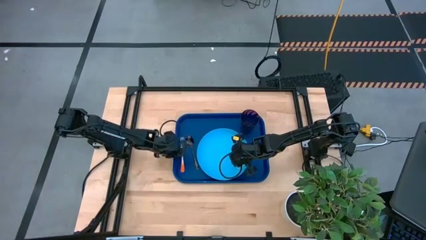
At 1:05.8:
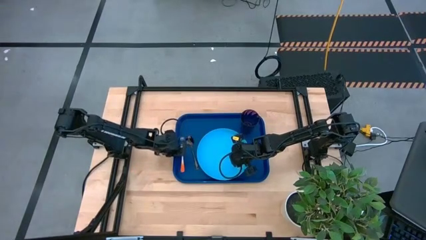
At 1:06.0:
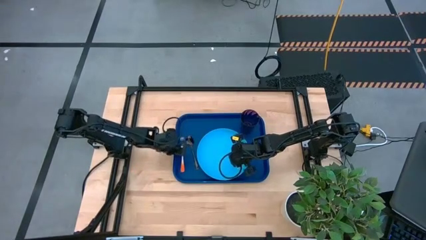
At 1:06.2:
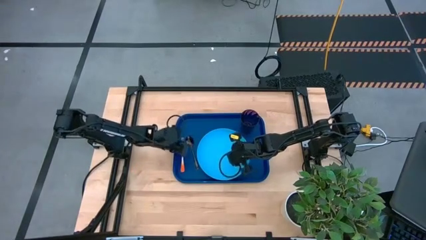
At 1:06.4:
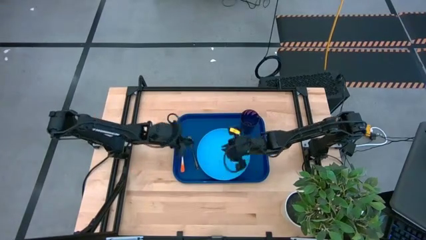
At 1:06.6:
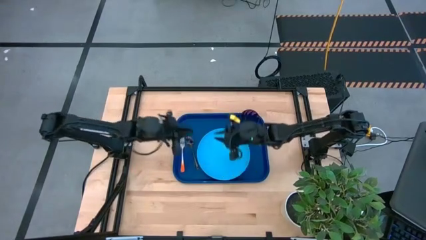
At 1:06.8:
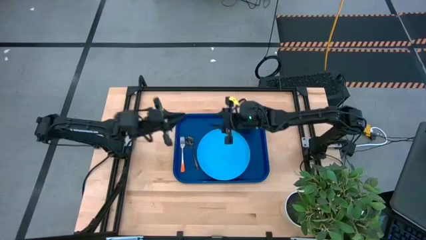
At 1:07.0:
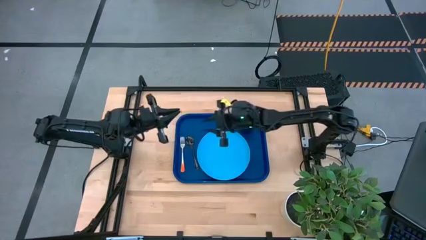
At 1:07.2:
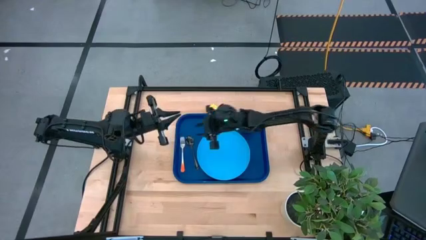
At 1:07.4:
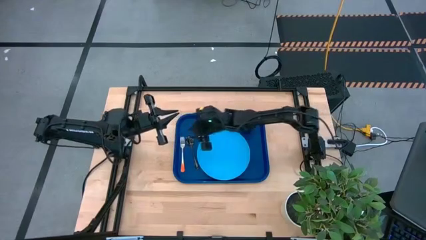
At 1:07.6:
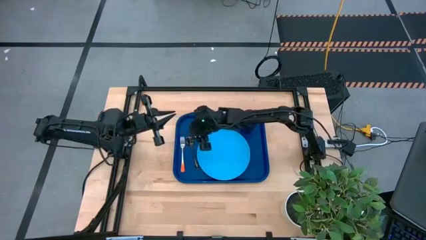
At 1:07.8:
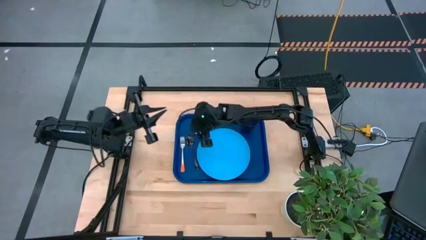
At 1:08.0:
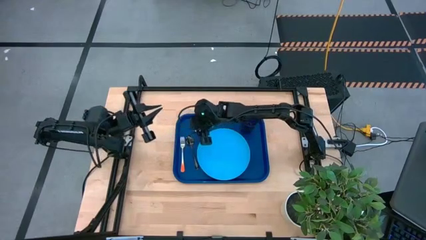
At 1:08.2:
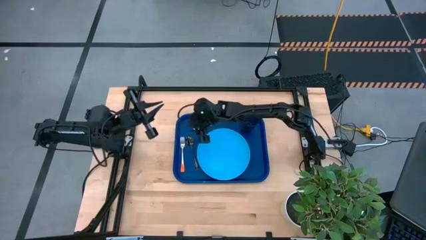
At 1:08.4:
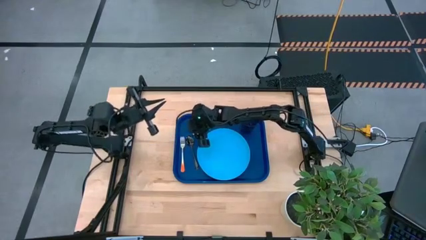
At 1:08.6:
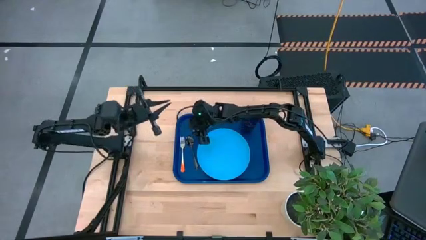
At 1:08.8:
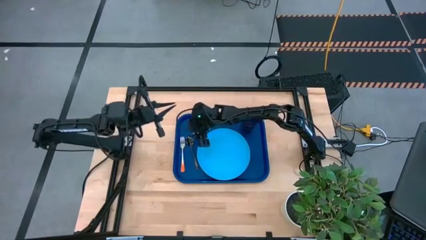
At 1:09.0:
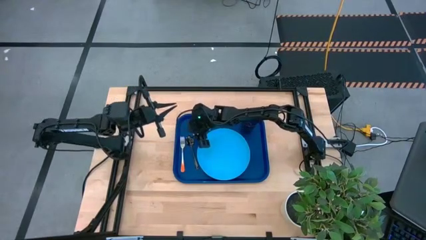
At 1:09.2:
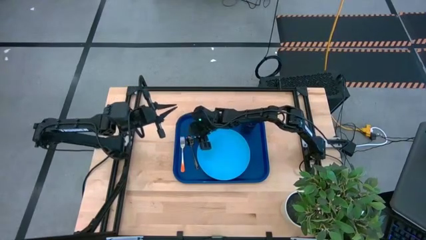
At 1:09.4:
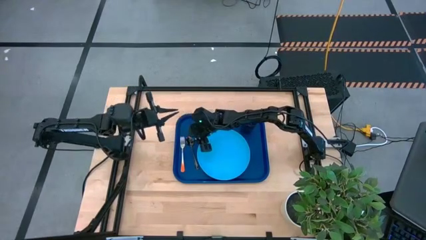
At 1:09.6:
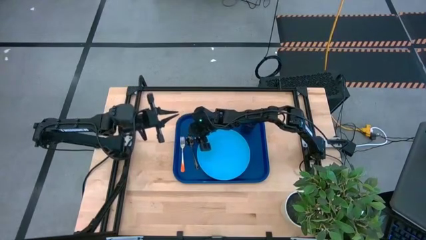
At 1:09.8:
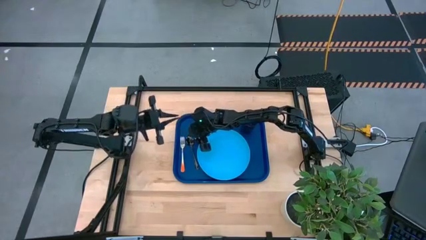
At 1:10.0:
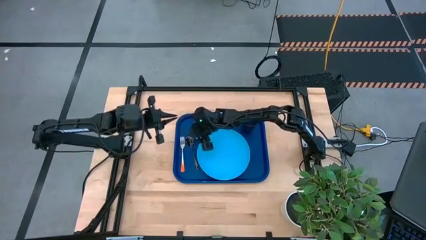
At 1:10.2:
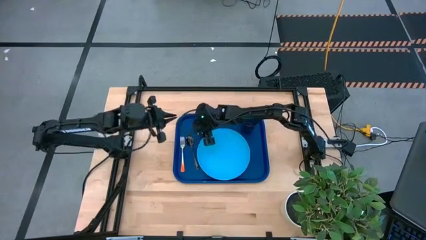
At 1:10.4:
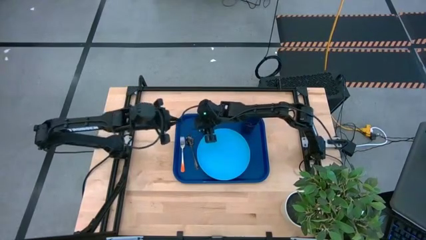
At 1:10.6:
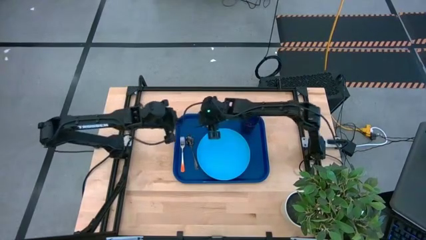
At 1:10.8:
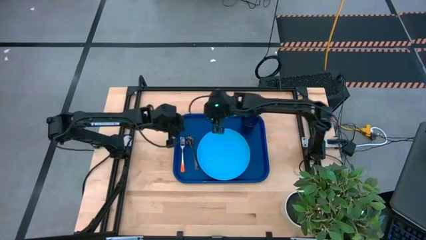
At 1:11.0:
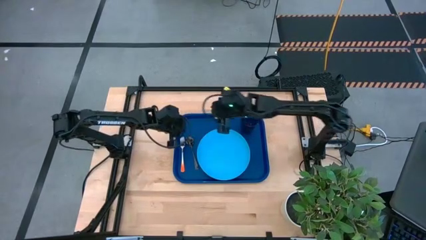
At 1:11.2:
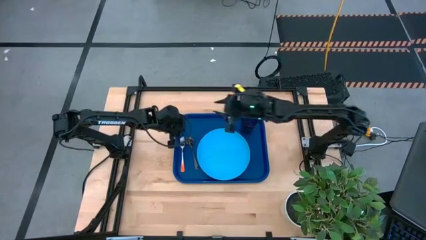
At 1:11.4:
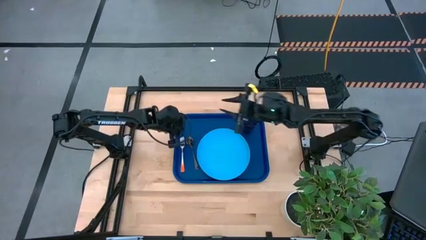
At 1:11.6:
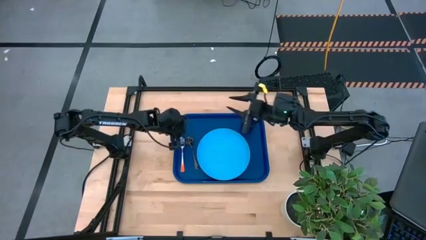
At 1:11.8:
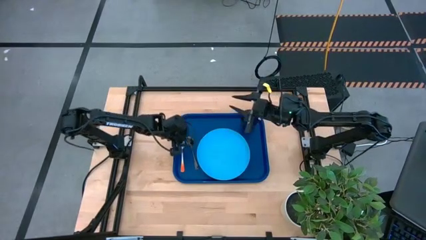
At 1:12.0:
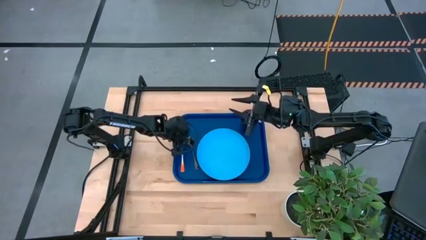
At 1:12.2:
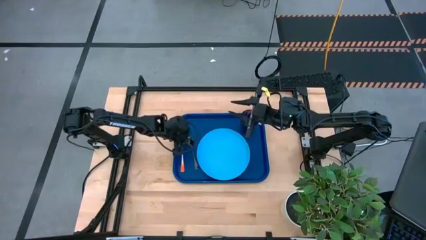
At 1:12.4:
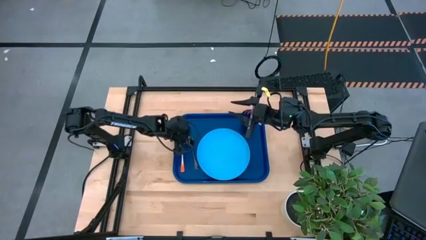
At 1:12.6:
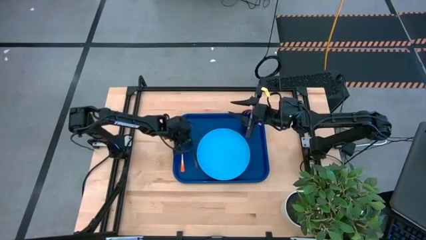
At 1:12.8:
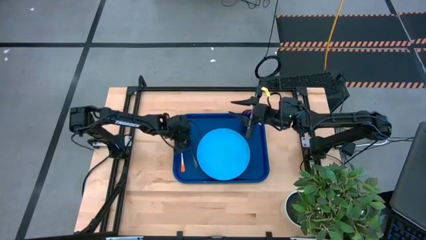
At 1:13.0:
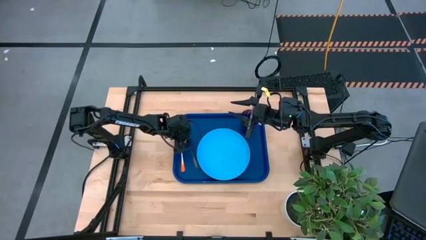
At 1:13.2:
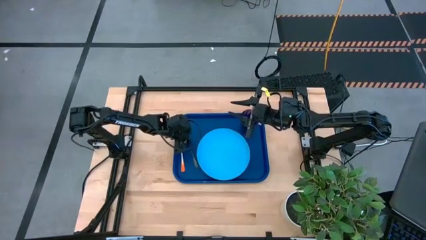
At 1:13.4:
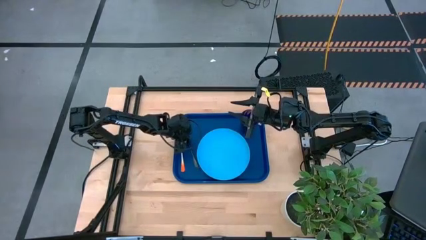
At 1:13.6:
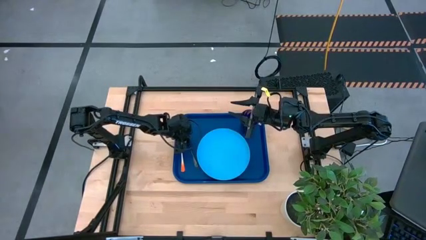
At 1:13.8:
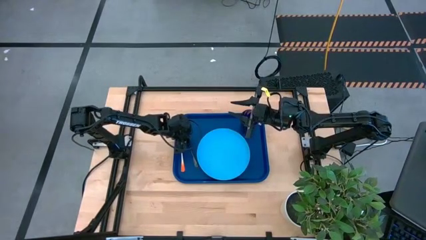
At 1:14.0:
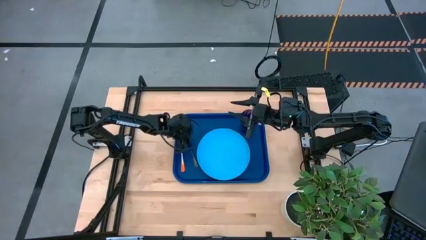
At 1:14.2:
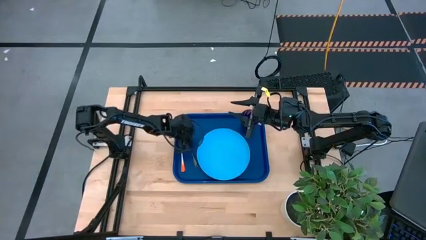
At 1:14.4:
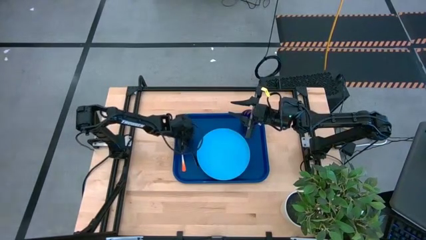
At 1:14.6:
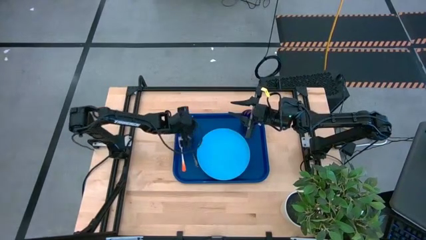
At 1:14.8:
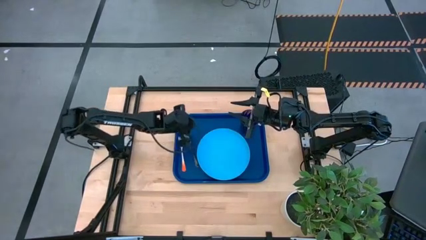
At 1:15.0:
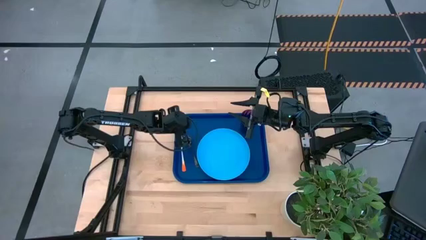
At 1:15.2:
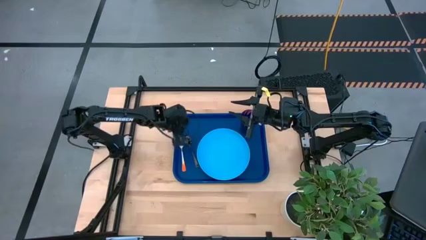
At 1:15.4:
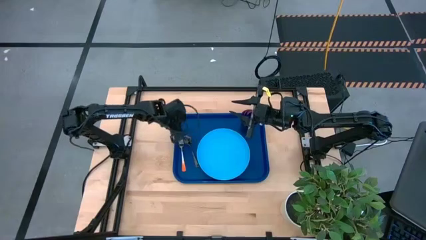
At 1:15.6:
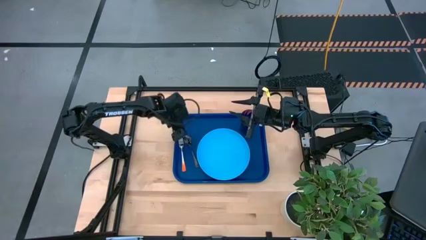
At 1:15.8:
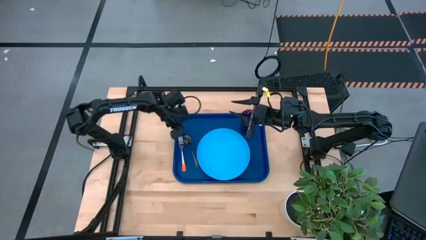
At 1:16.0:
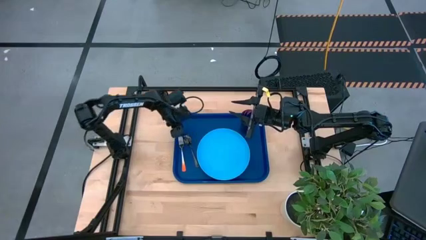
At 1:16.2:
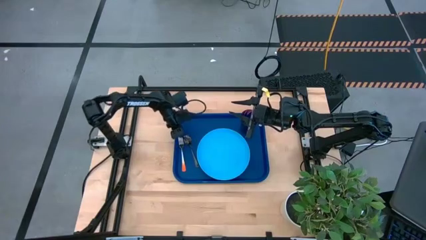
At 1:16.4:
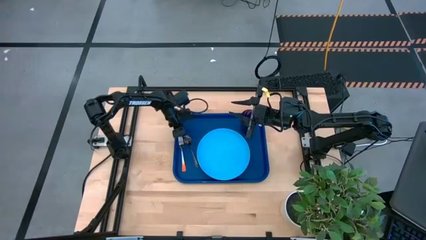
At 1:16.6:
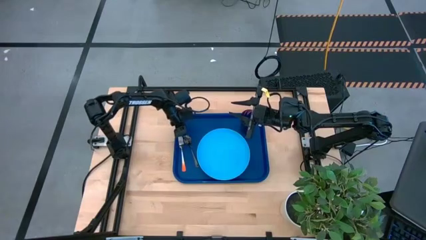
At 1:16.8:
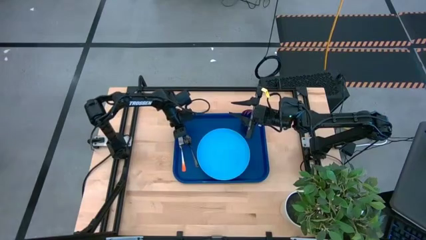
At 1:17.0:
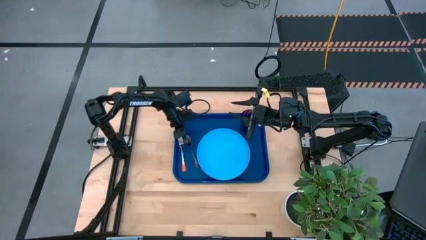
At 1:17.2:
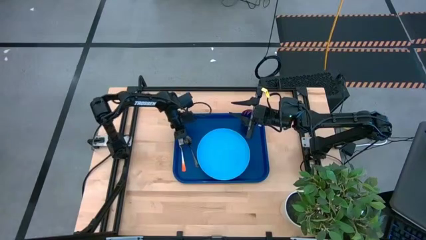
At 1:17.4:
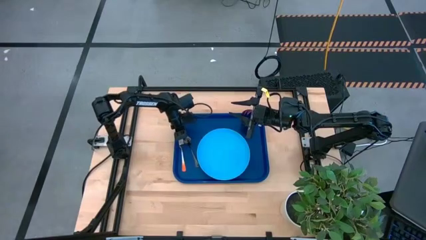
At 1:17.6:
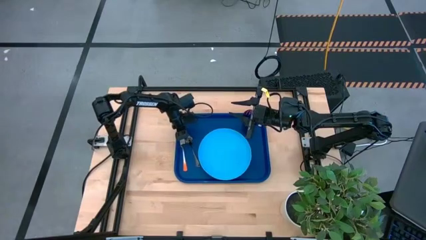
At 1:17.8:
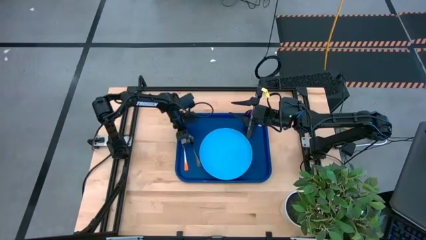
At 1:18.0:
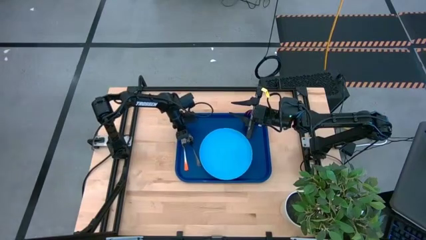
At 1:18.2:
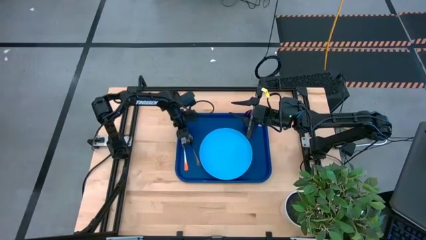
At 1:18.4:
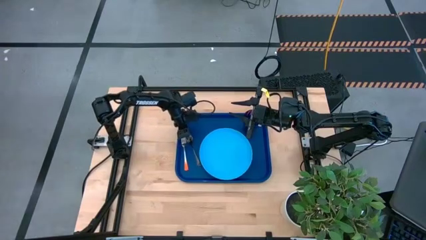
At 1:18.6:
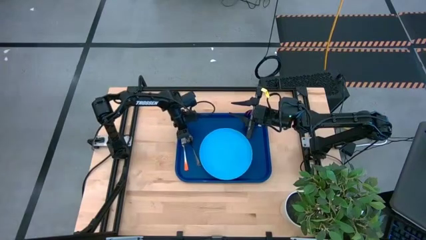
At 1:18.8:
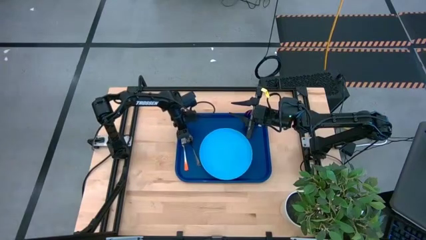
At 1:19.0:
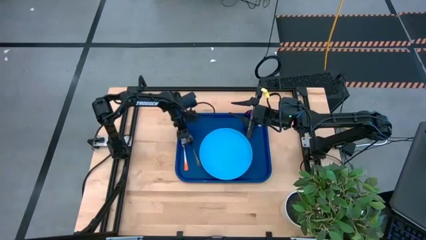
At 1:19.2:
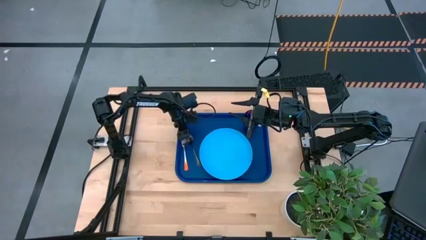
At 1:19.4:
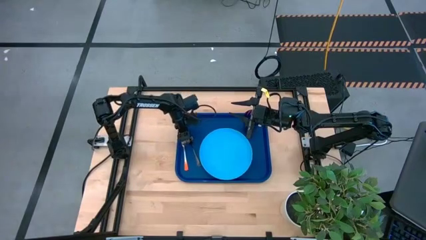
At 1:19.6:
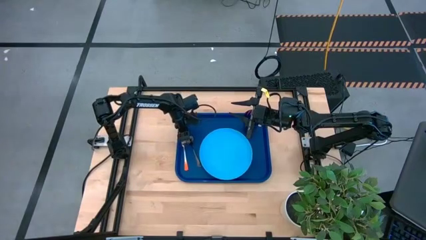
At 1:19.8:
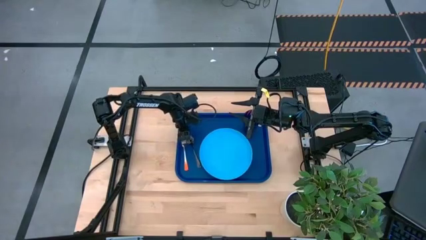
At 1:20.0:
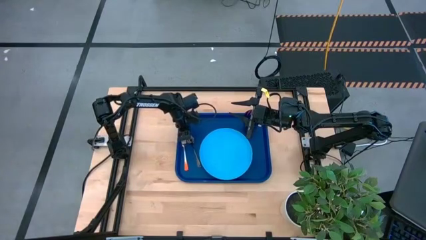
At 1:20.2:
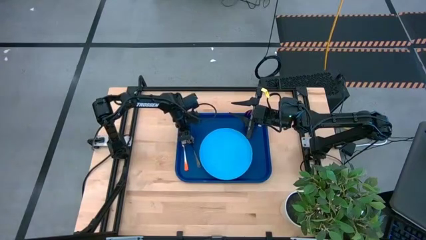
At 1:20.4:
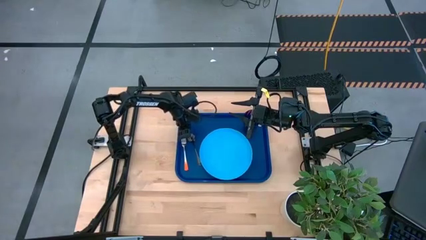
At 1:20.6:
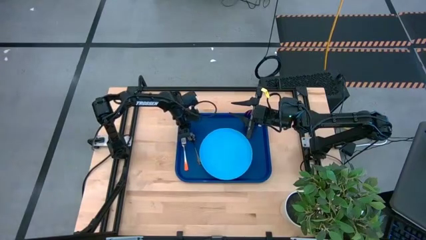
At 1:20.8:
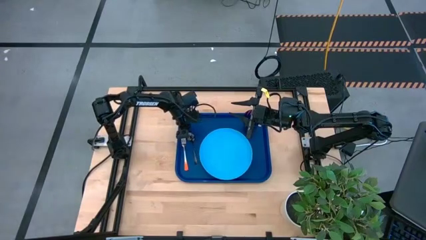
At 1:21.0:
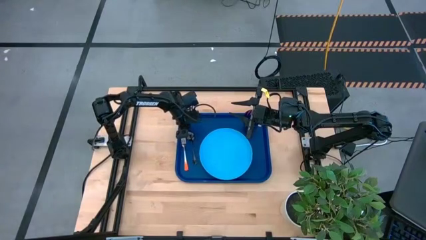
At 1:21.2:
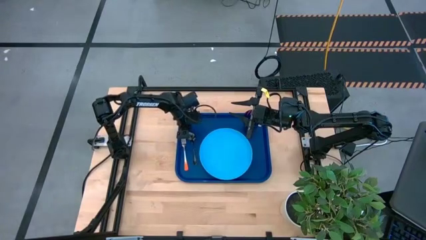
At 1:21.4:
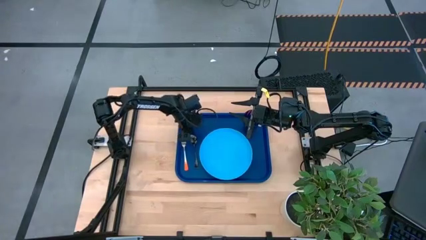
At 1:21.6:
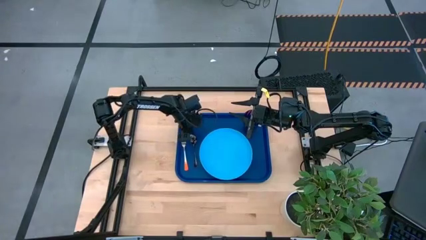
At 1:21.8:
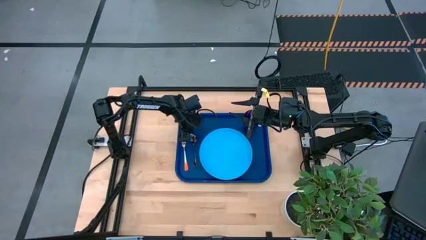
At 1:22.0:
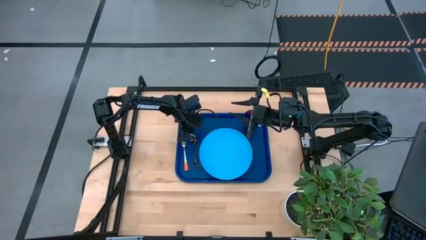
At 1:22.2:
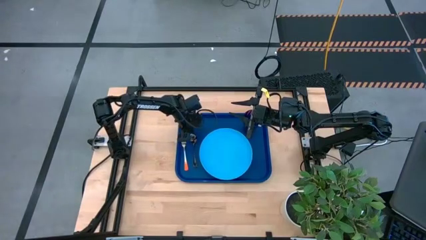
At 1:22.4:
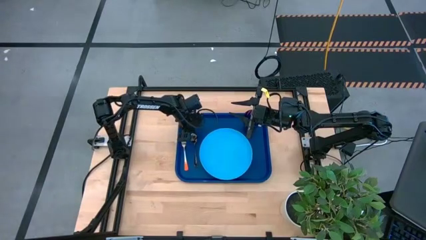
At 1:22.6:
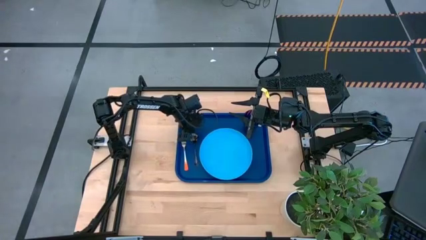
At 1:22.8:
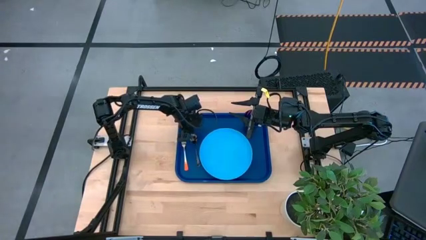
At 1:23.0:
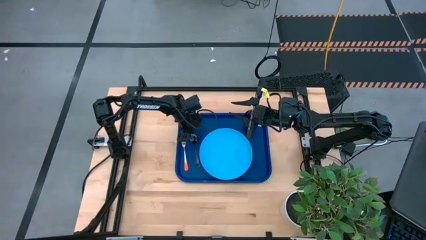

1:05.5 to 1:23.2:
Task: Pick and place plate/cup/fork/spoon on tray
Adjust the blue fork and black spoon on the blue serving tray
